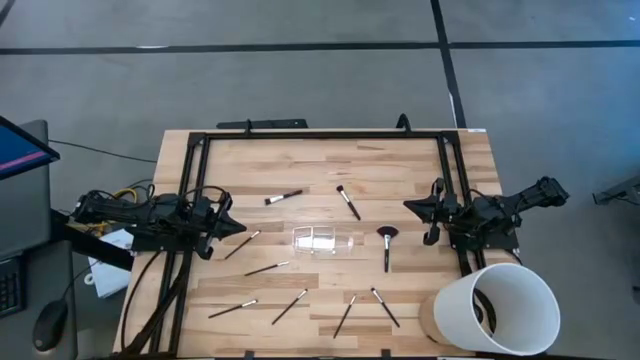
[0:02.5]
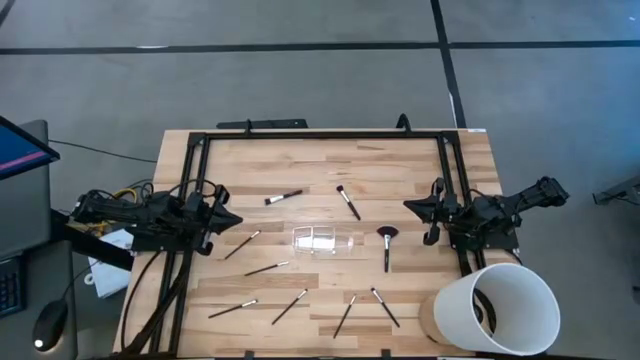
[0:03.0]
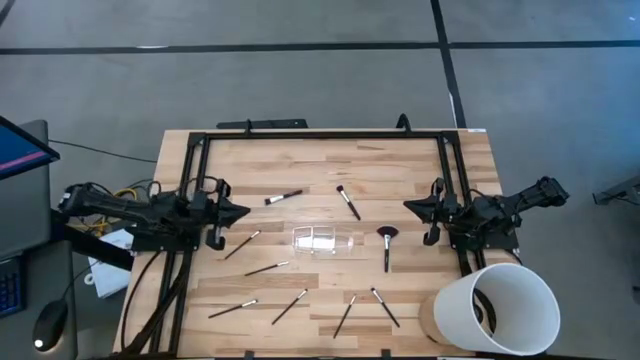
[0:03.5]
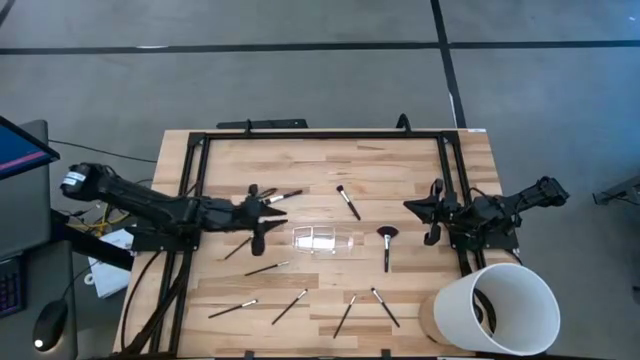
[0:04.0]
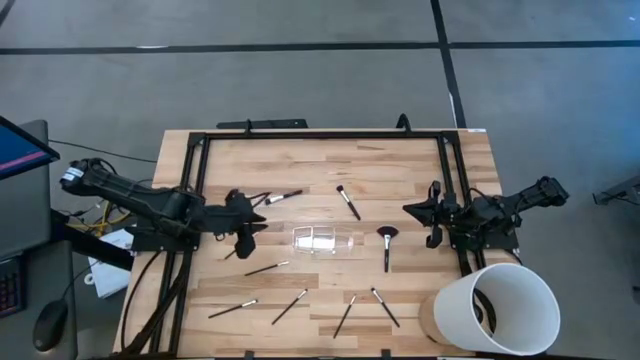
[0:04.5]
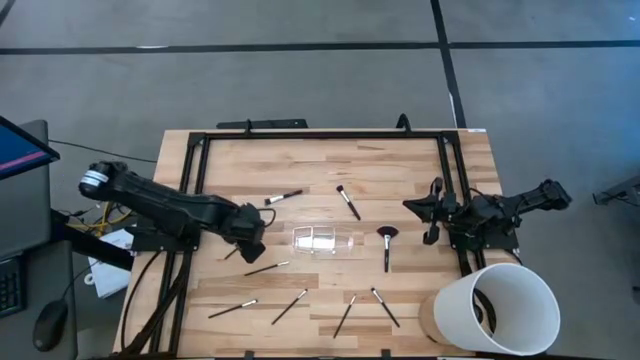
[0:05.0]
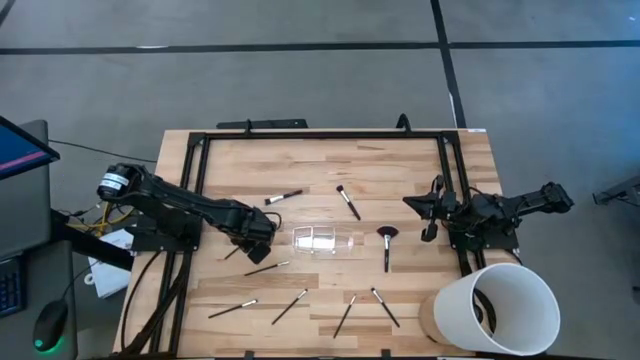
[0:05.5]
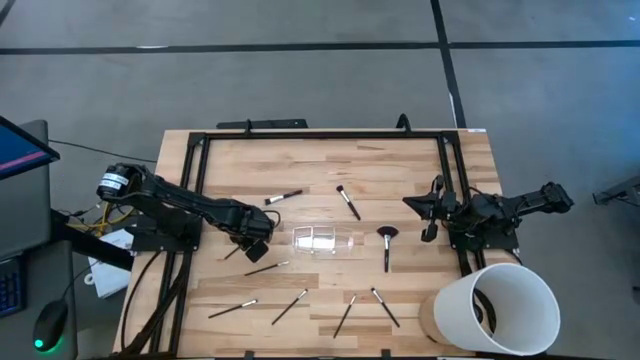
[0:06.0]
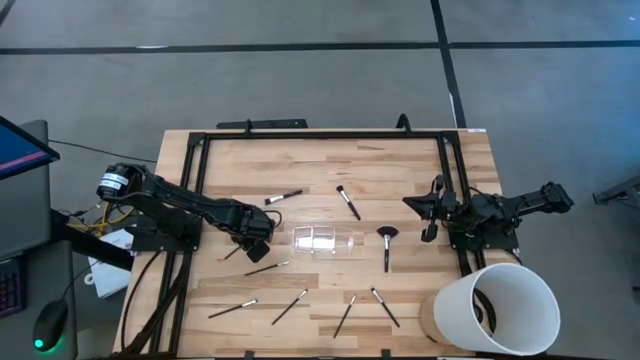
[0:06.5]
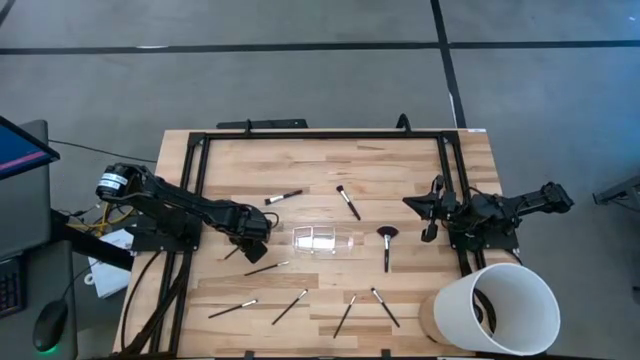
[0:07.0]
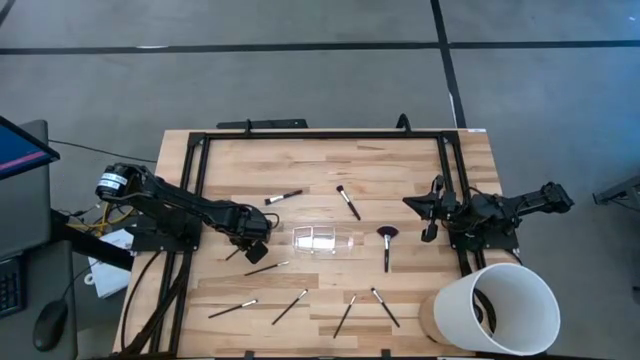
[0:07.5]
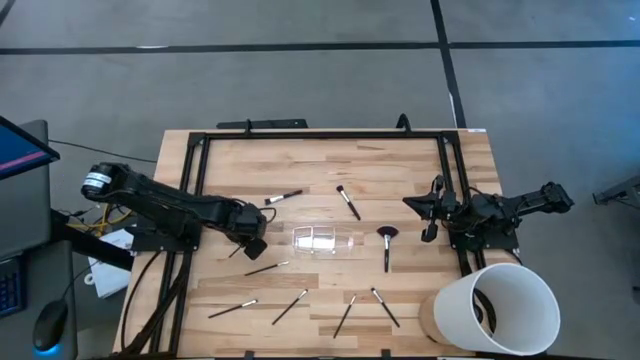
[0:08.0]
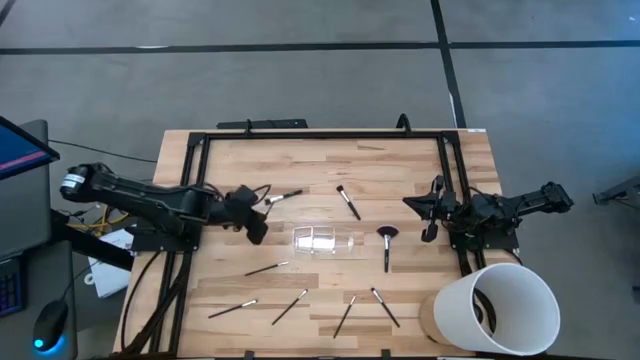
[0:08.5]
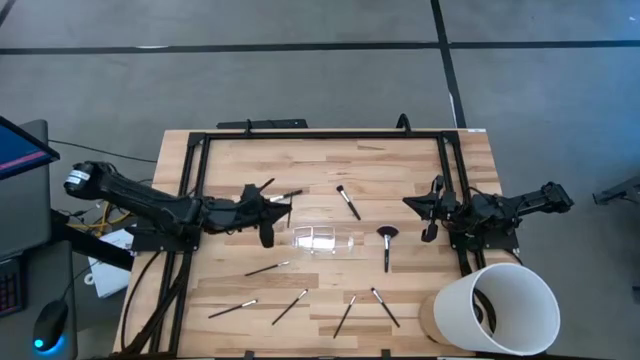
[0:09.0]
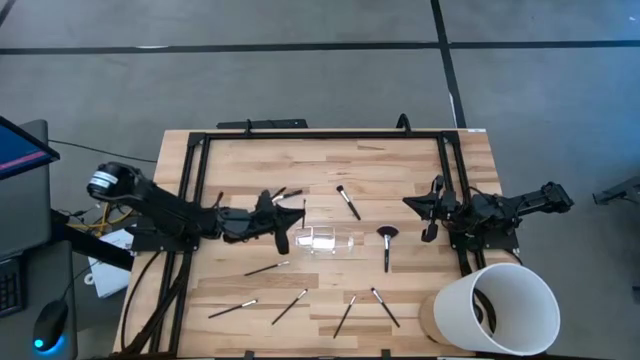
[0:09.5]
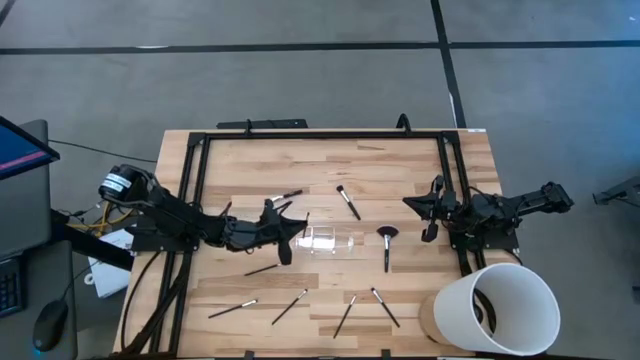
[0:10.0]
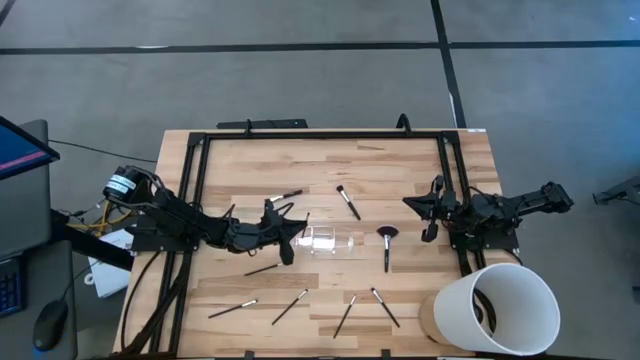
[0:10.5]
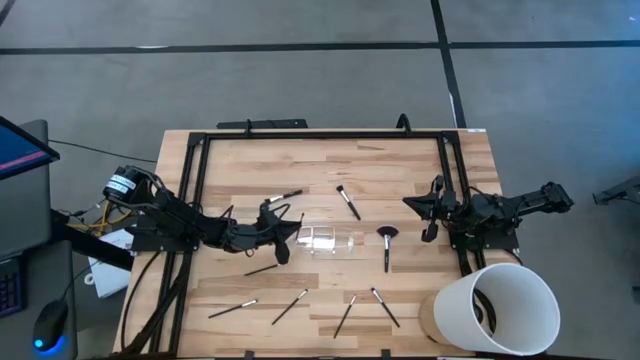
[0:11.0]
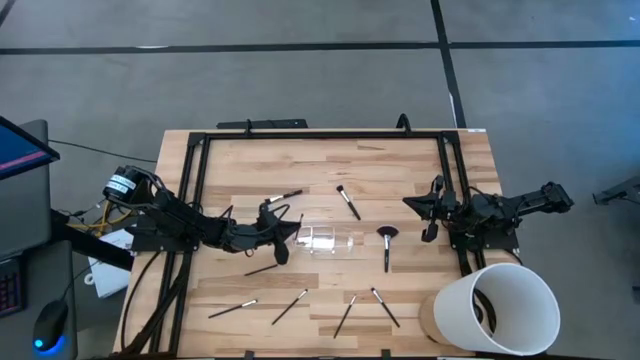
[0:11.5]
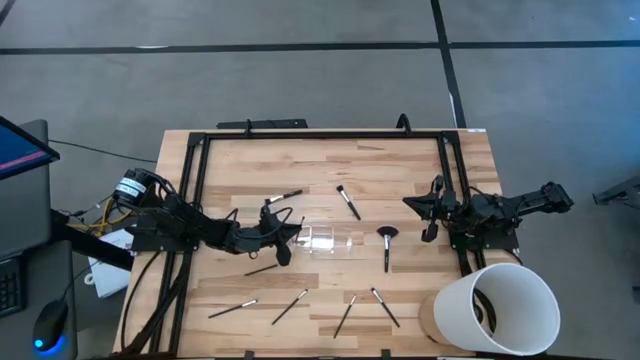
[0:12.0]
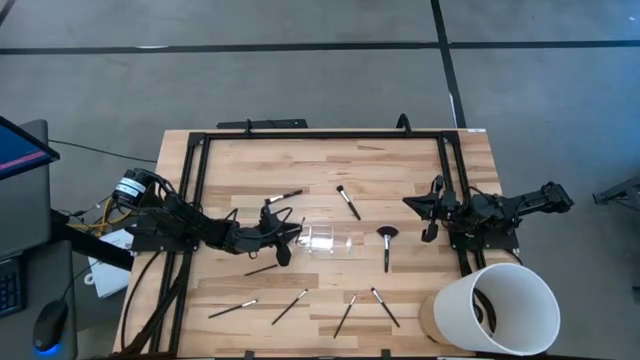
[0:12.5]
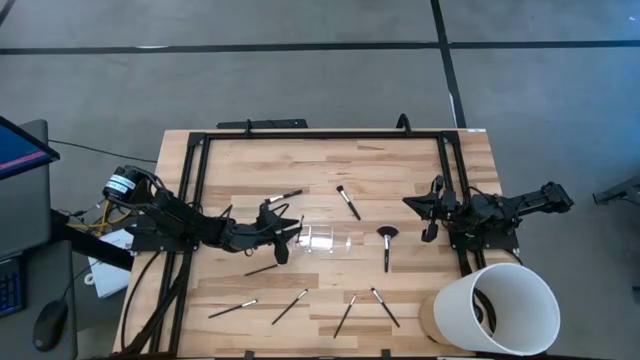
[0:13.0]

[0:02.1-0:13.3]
Task: Put items in baskets/containers
Put the eyeshadow brush into the left section of the transparent organizer

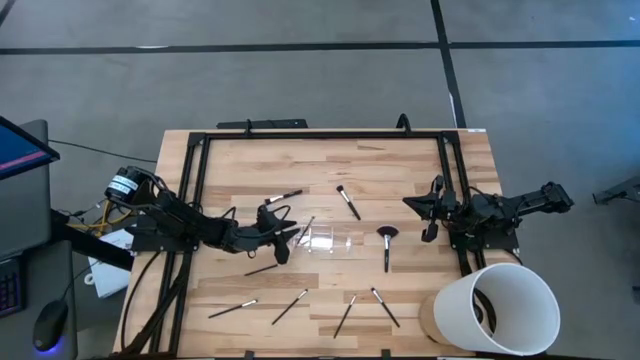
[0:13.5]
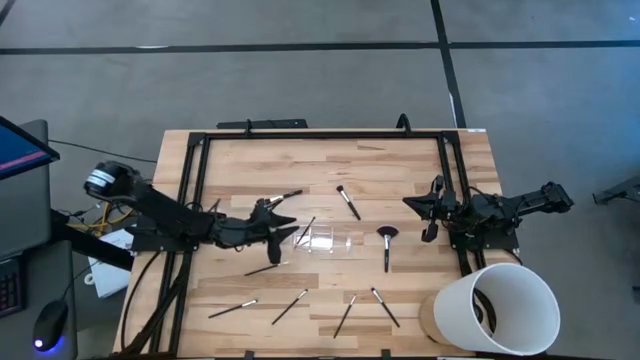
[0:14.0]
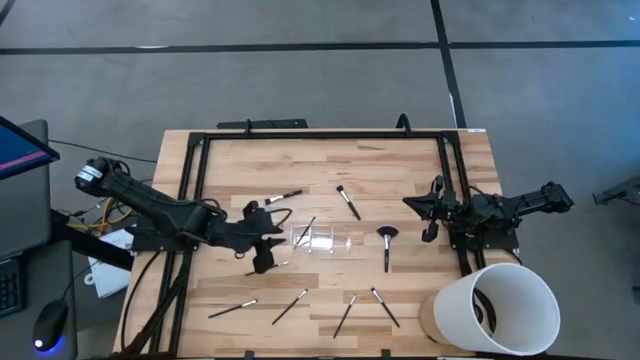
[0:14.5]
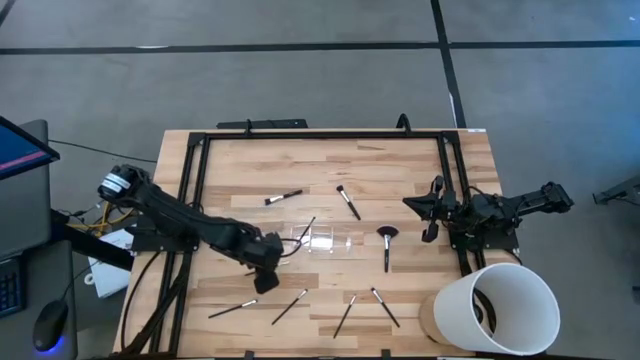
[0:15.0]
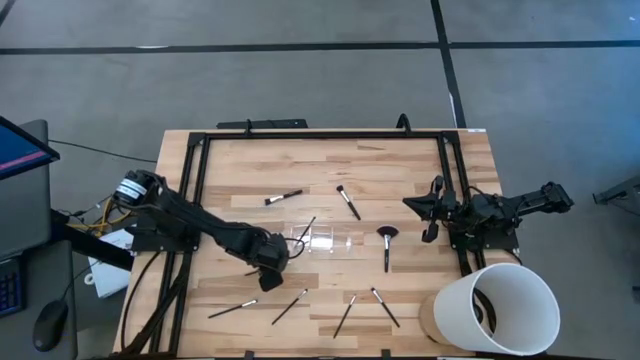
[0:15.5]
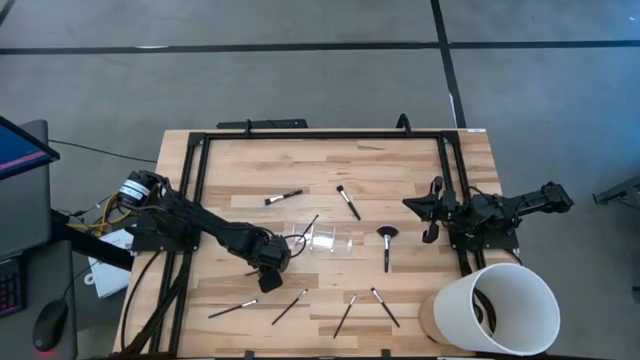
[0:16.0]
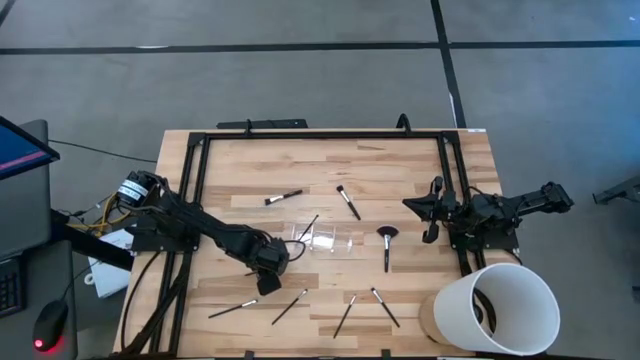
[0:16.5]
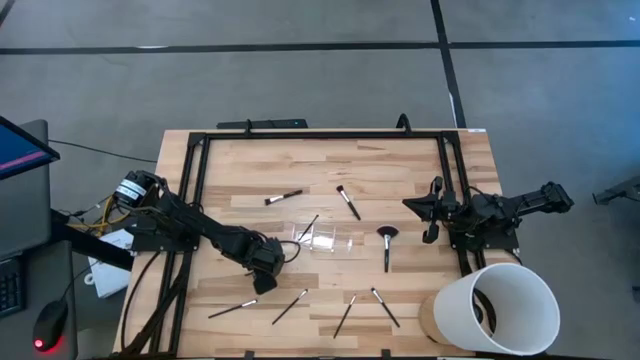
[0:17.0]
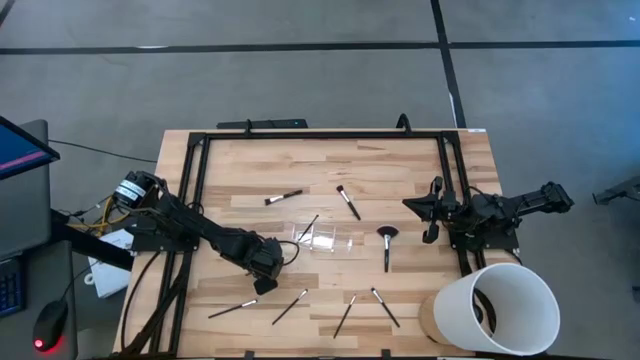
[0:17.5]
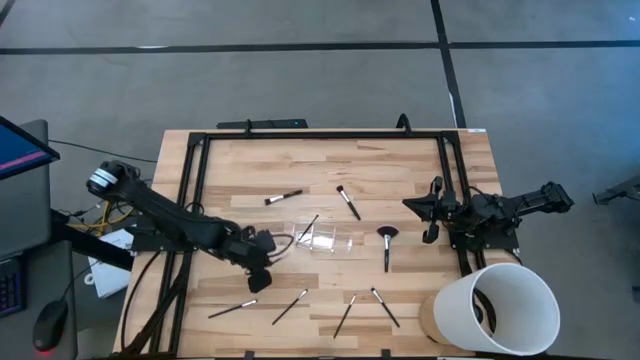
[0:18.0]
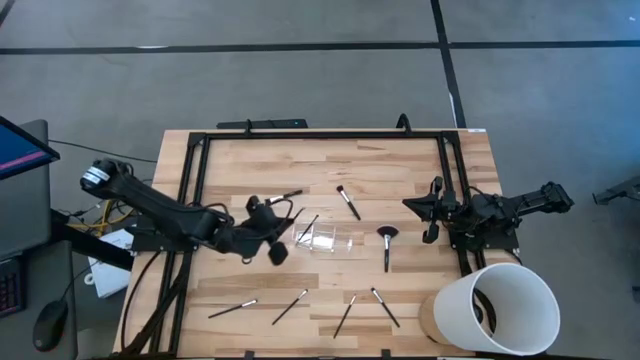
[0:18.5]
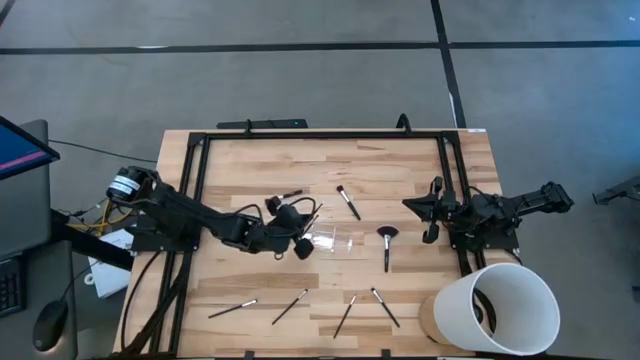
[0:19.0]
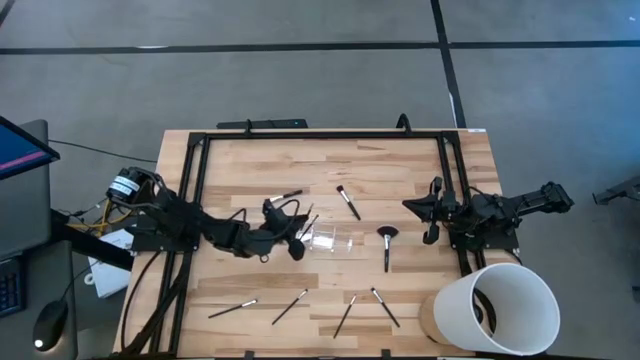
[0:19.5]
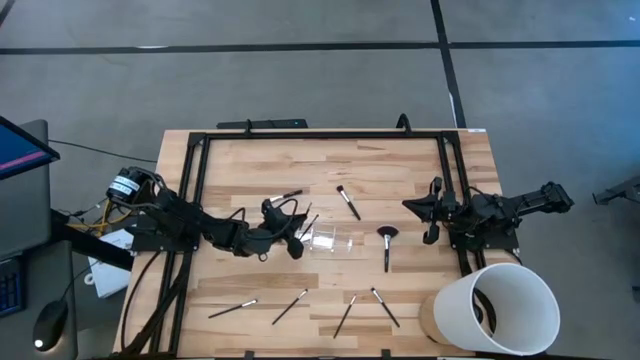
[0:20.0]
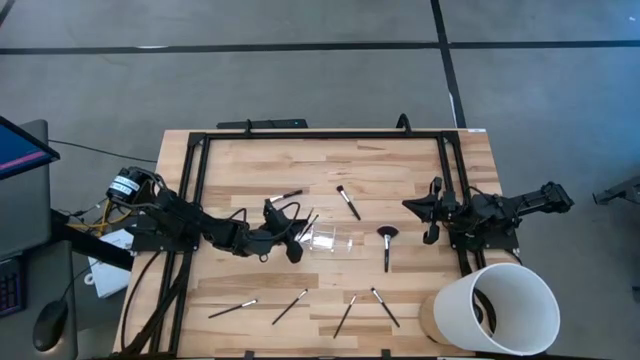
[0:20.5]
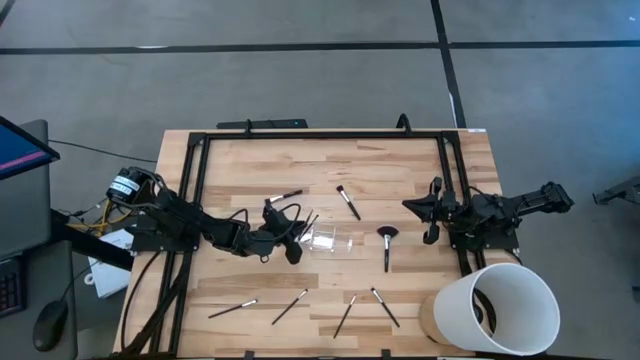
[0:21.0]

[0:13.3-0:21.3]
Put the eyeshadow brush into the left section of the transparent organizer

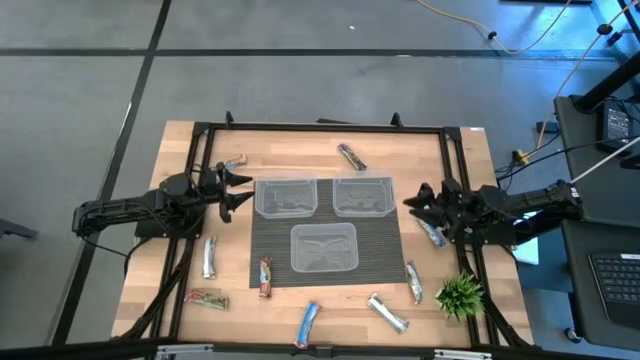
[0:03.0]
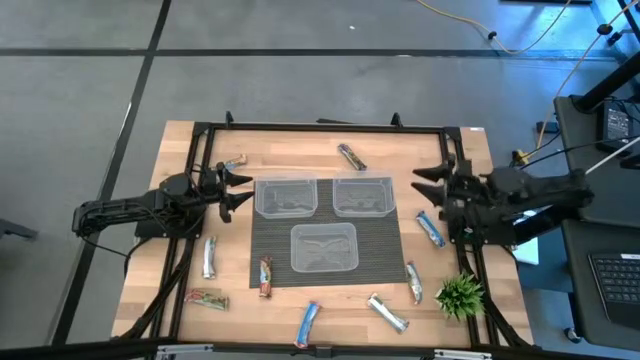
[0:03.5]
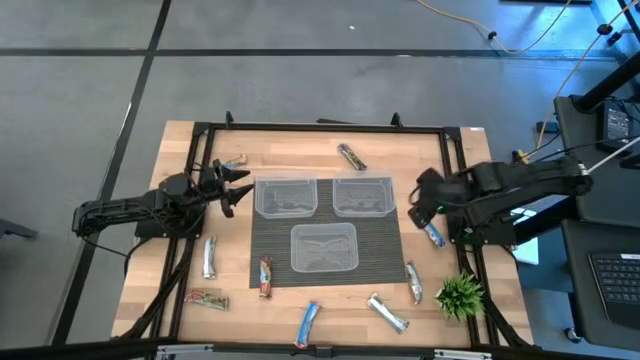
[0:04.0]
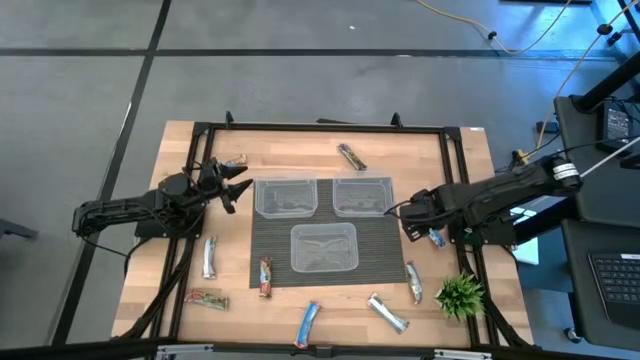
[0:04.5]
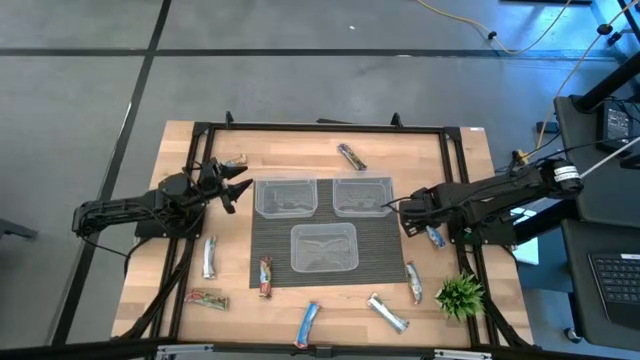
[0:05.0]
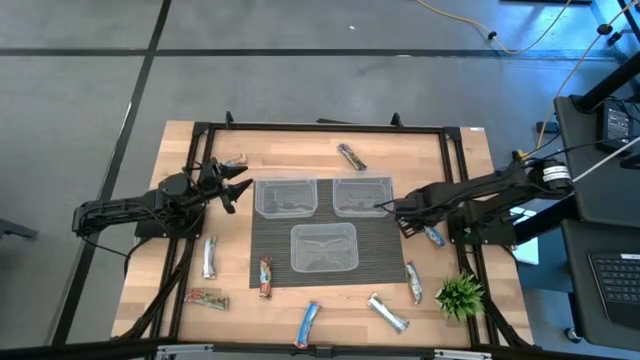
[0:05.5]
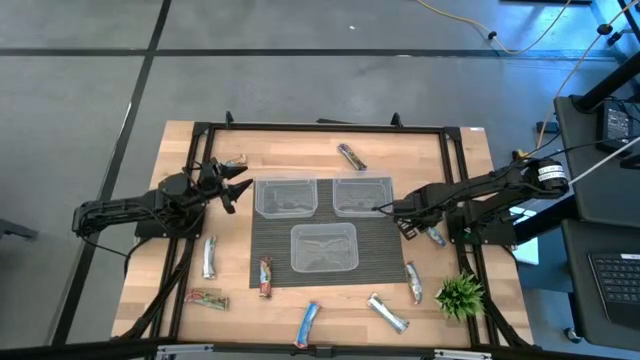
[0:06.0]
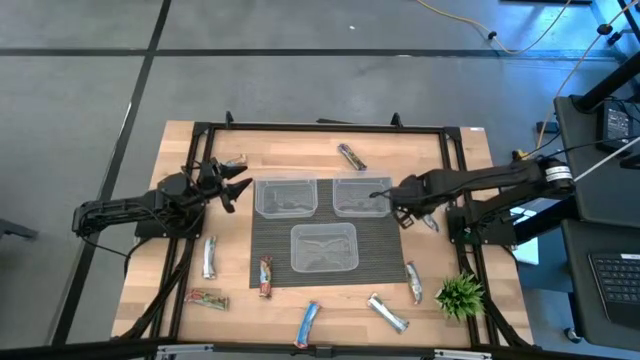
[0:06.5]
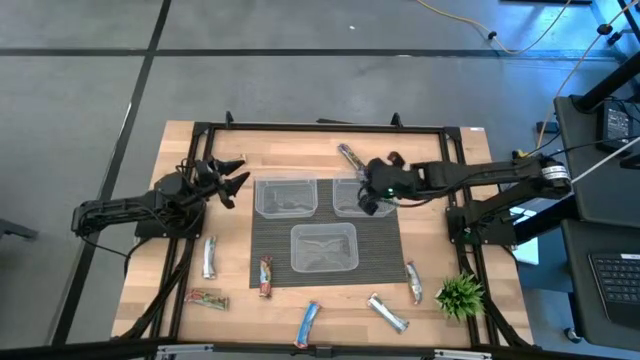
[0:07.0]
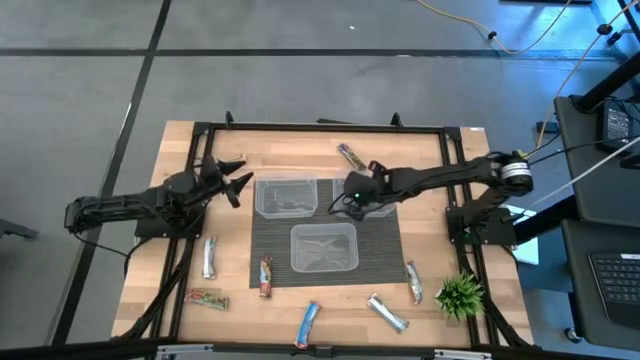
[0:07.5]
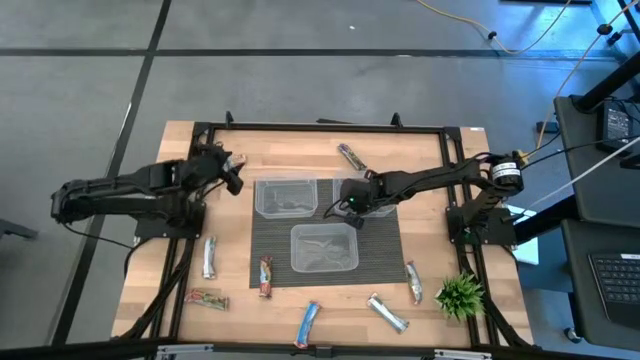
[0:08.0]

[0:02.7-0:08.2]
Task: Pick and place Granola Bars by type
Put the blue granola bar into the top right transparent bin
